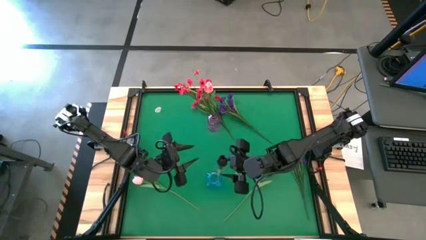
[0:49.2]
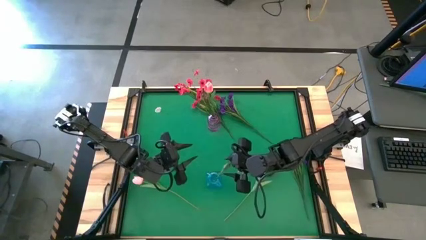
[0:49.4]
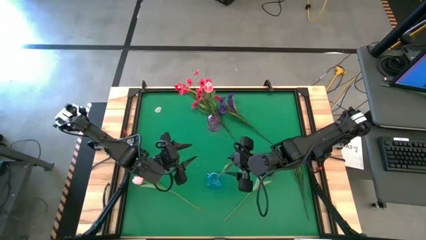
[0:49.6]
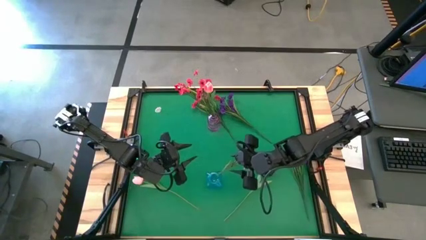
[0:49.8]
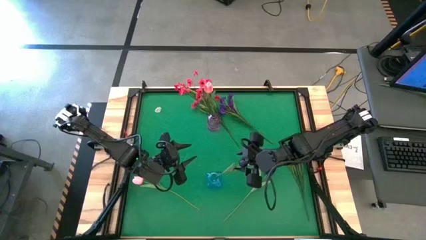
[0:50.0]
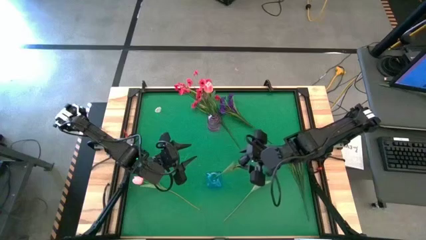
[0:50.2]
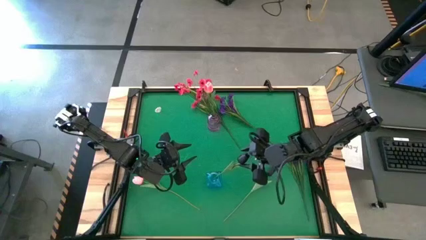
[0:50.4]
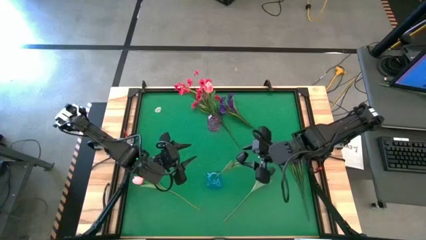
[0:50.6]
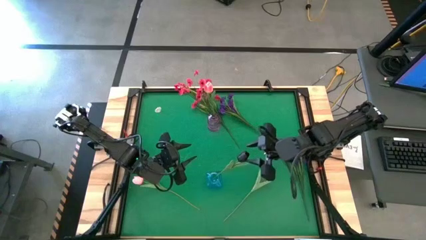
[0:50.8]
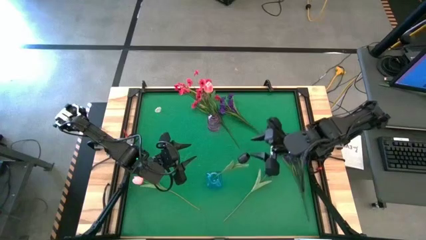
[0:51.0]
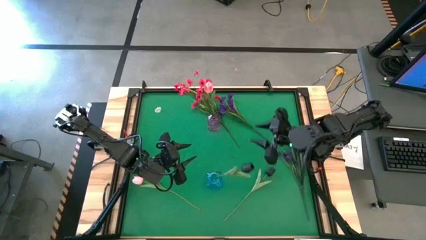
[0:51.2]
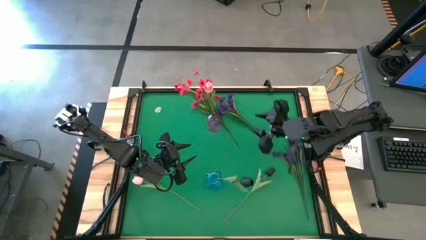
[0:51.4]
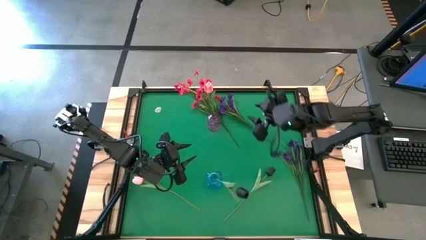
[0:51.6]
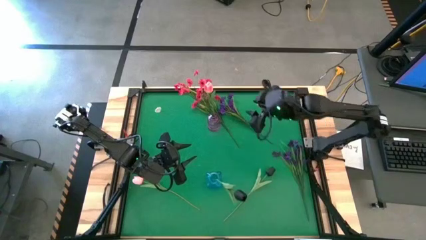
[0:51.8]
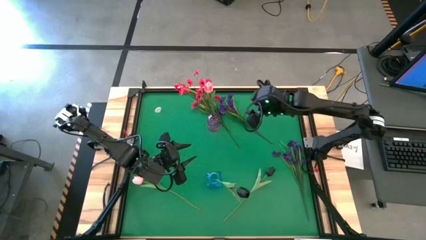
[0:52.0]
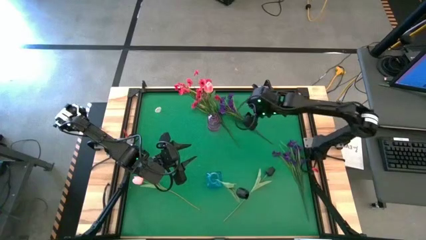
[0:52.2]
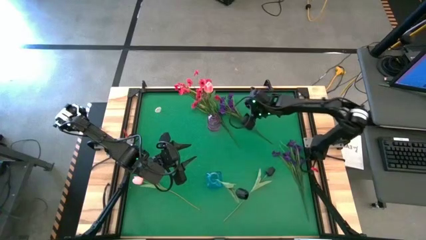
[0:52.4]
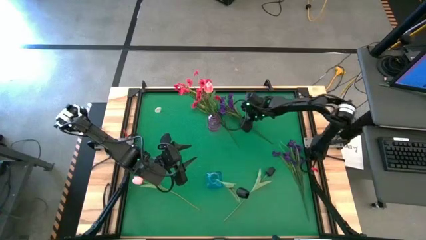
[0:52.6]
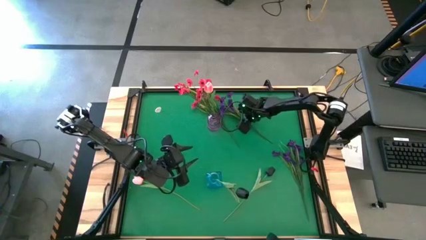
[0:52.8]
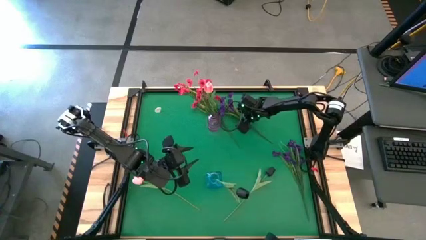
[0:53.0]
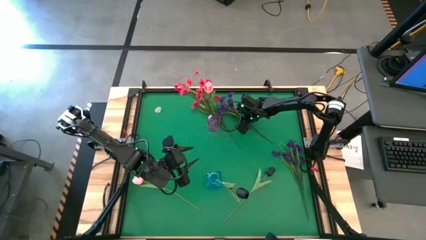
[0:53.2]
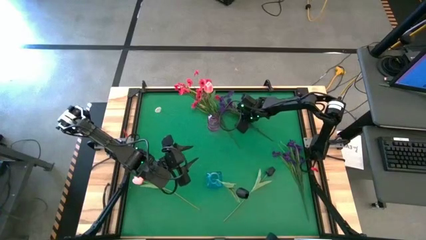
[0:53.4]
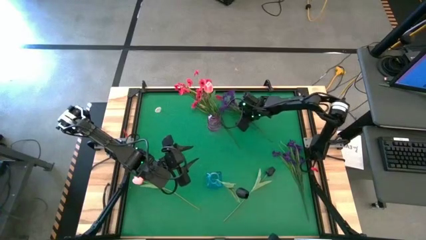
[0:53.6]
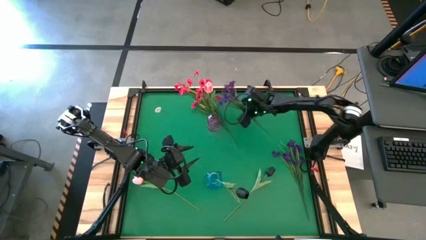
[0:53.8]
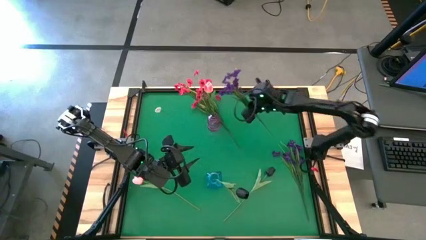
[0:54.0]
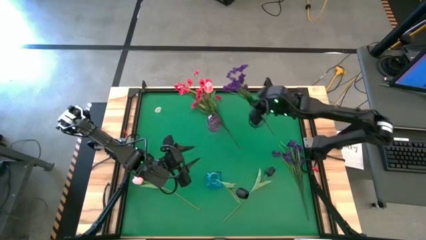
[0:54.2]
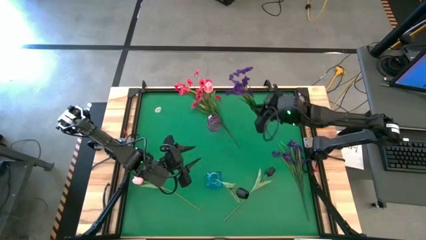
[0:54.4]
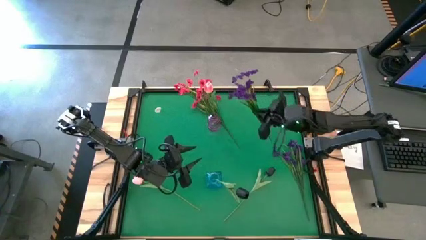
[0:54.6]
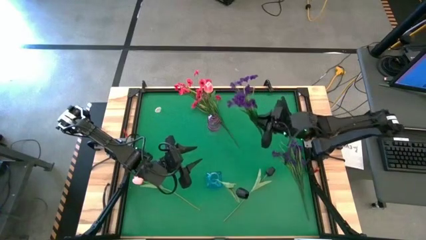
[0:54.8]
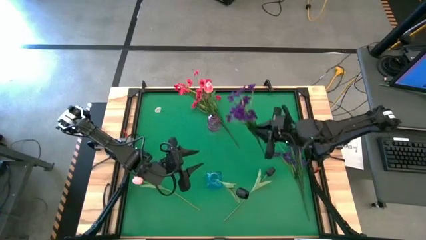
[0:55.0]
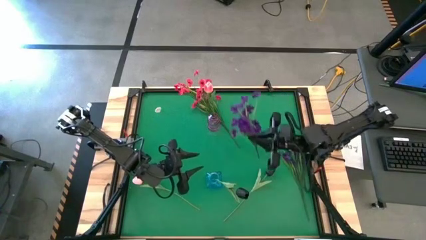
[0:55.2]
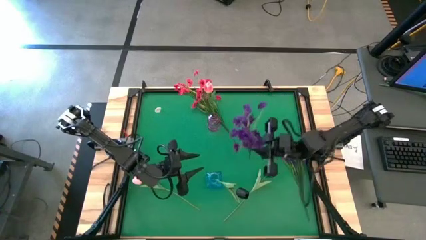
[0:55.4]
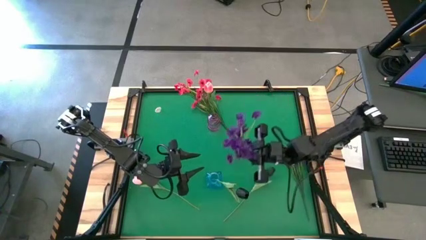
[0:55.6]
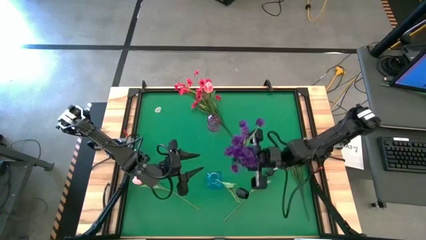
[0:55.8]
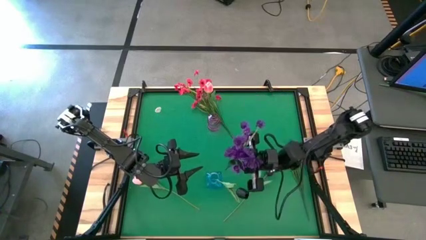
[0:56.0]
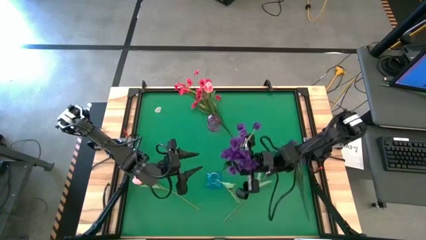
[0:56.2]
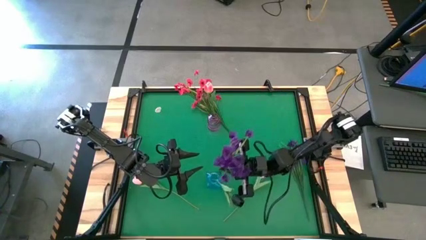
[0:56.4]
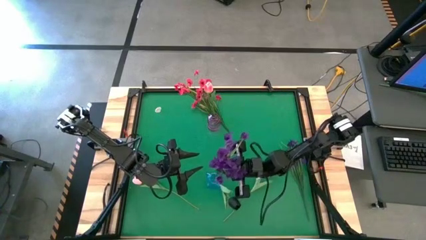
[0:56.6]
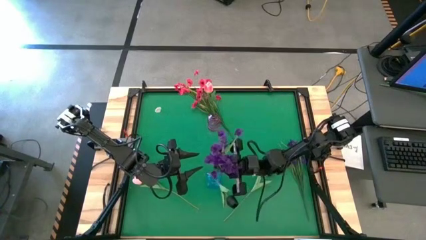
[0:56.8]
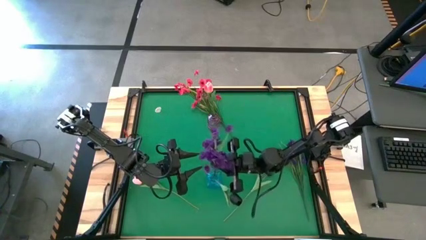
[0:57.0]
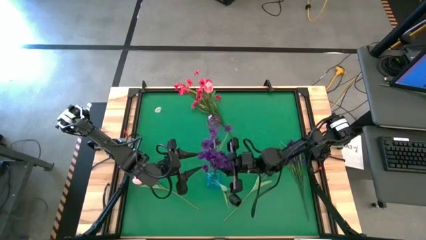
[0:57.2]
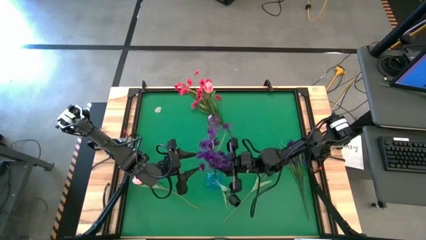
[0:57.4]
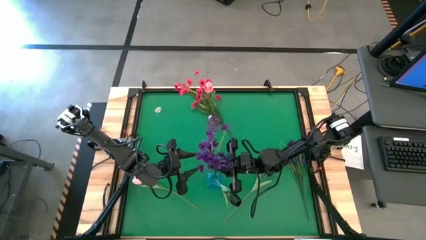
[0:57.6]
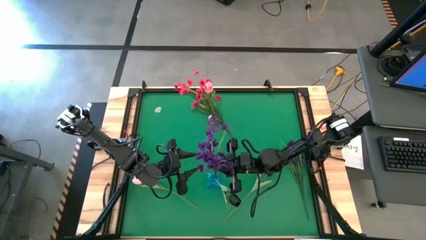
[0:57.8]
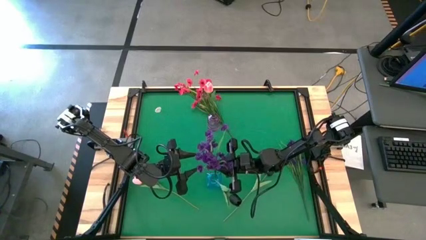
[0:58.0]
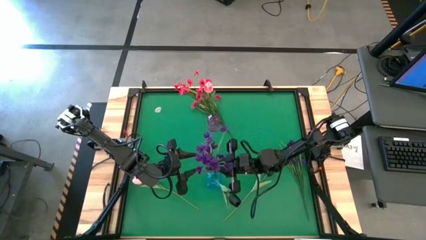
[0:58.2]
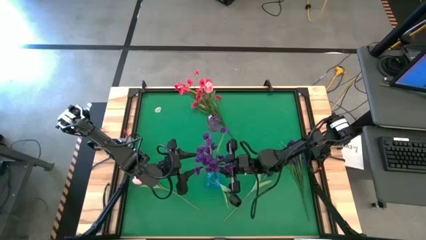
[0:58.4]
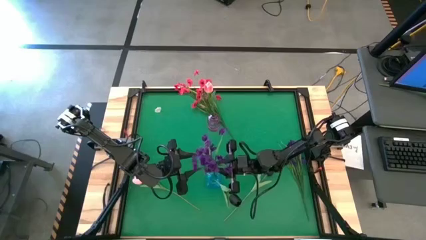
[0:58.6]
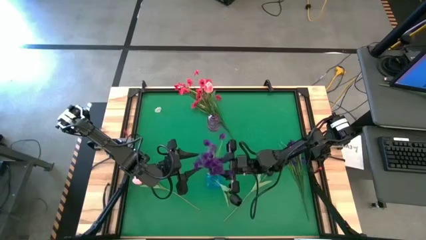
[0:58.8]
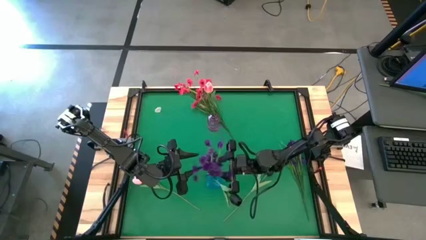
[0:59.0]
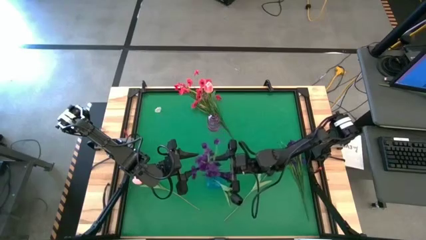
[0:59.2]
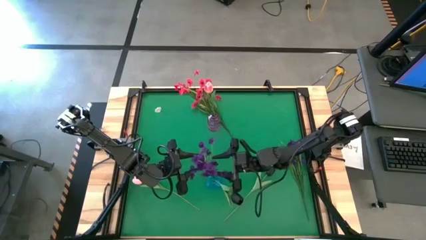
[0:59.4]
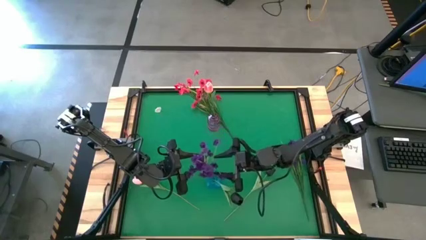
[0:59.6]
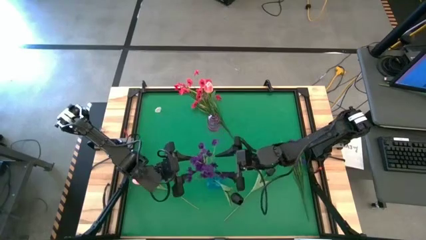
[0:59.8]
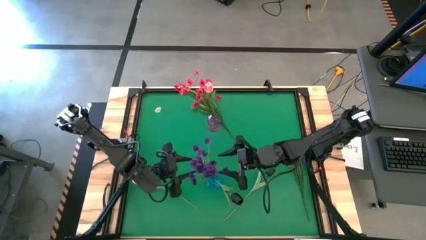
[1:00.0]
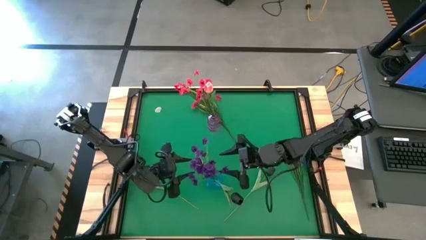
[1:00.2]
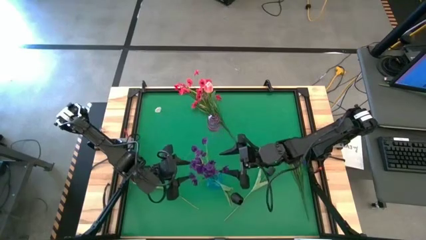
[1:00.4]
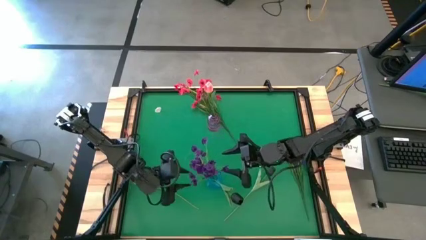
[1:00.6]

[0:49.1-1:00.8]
Task: Sort flowers into vase by color
Put the top purple flowers into the blue vase

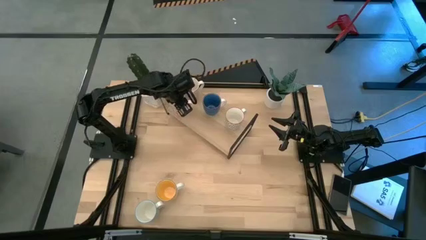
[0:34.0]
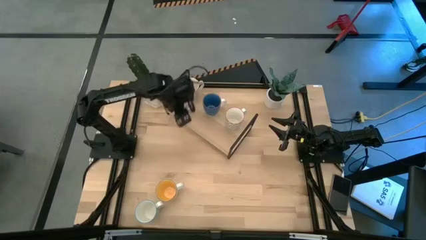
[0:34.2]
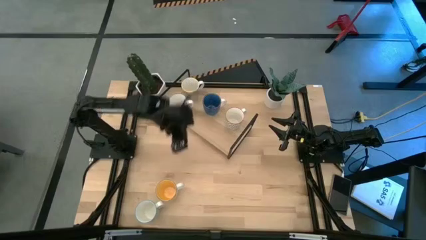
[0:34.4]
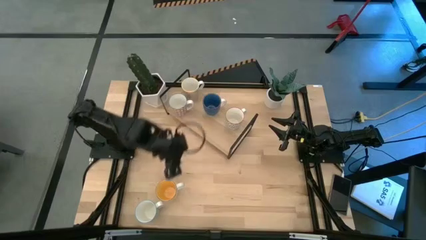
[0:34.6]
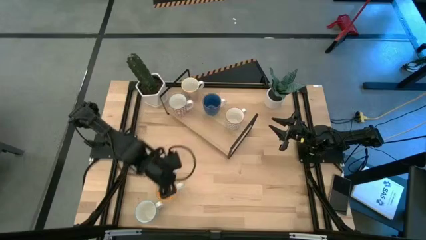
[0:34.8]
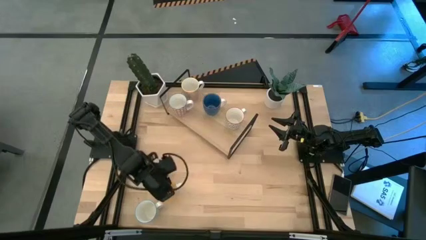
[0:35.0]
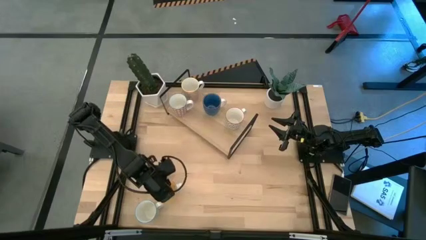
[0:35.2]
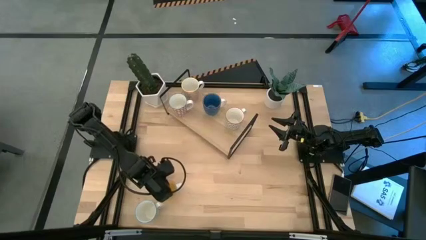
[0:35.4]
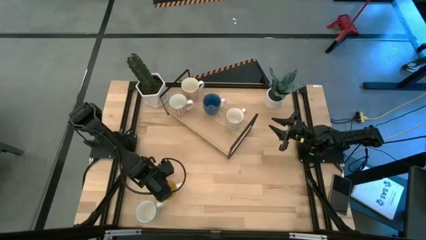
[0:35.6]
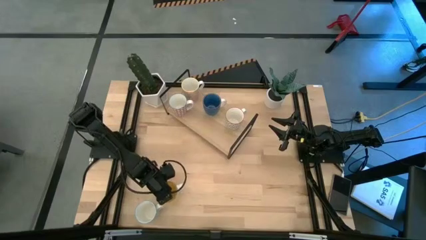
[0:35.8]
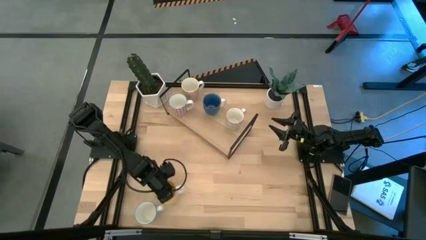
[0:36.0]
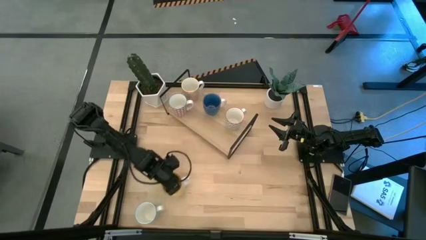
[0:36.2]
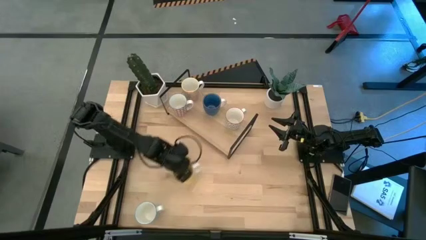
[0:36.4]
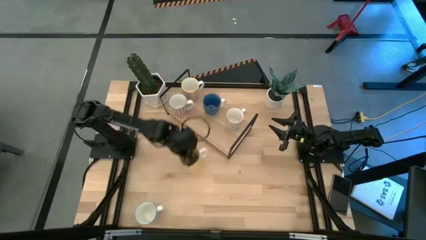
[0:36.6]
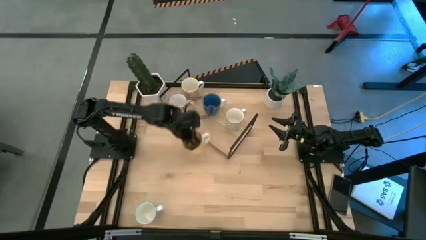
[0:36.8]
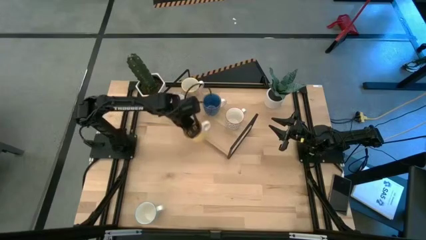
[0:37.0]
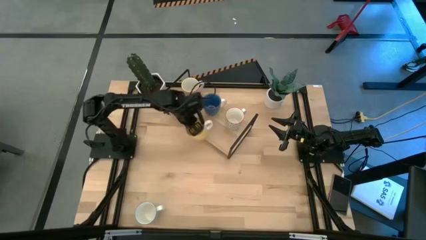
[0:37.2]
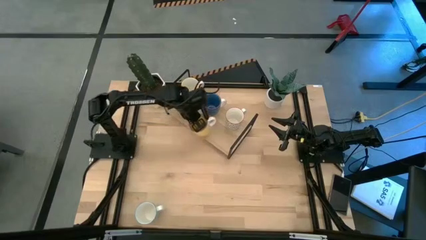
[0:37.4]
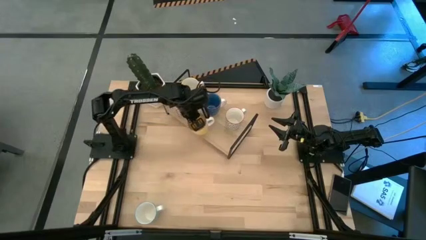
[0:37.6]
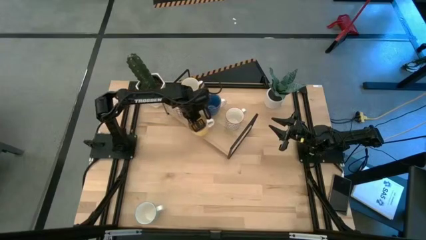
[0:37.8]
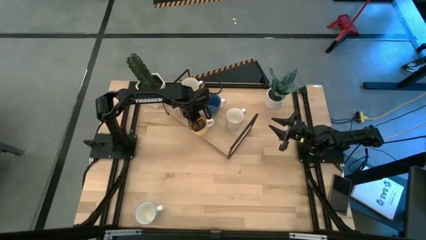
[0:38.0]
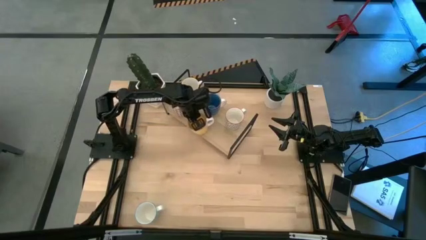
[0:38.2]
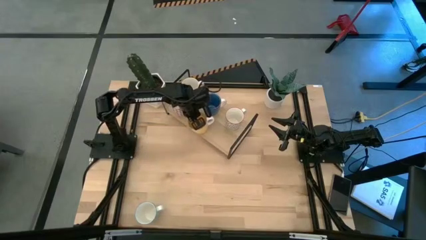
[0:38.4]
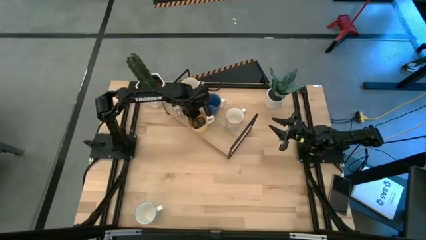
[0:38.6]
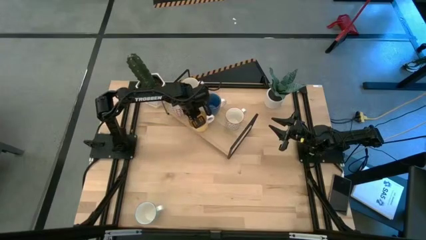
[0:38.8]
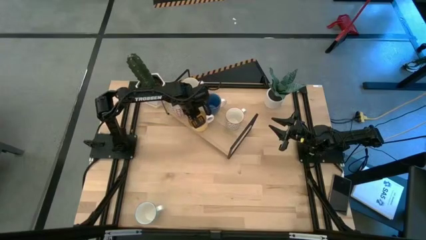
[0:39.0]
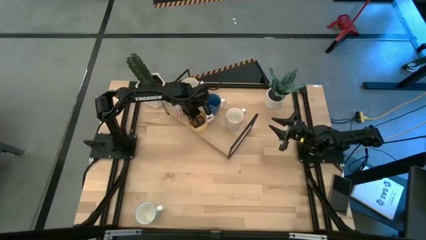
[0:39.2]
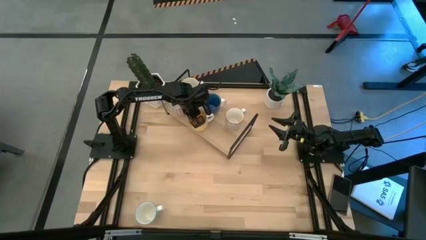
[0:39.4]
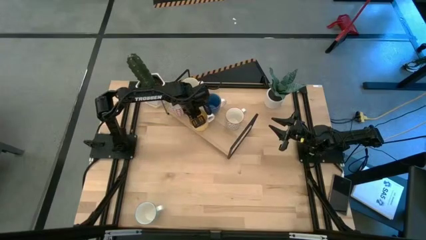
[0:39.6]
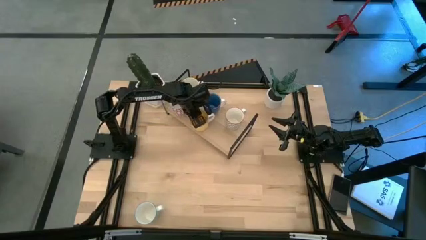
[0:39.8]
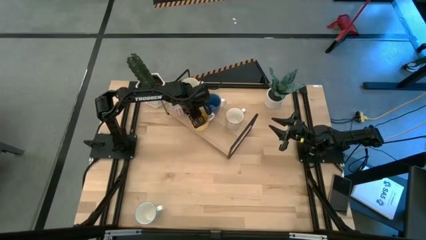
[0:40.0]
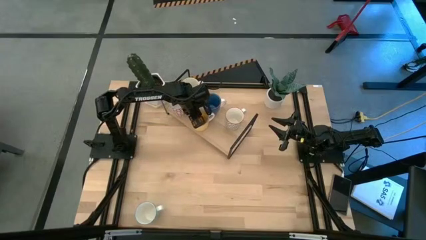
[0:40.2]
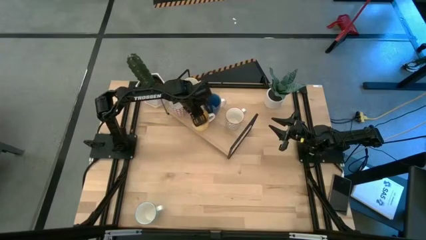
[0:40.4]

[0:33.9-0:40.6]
Task: Place coffee mugs
Put the yellow mug on the shelf
